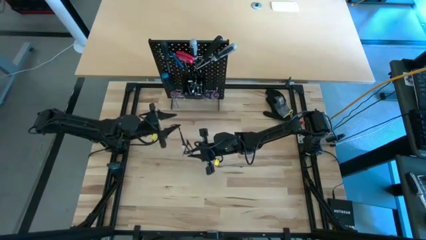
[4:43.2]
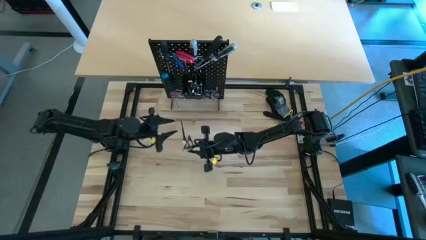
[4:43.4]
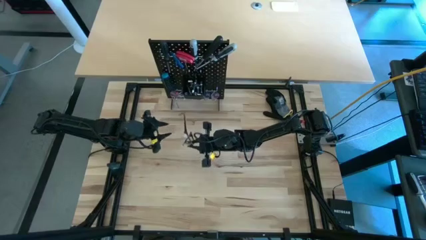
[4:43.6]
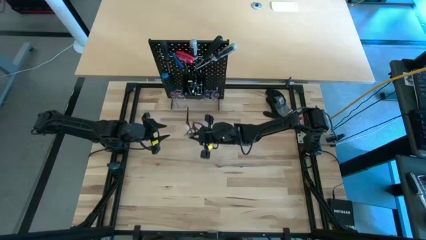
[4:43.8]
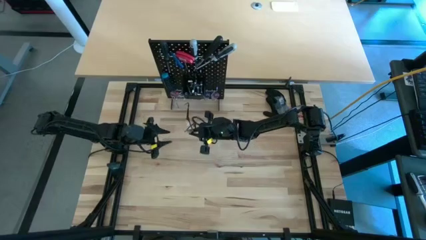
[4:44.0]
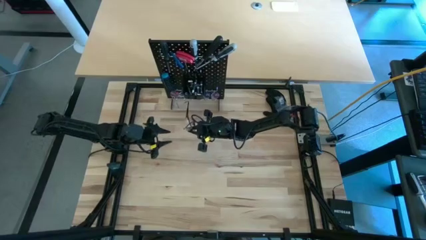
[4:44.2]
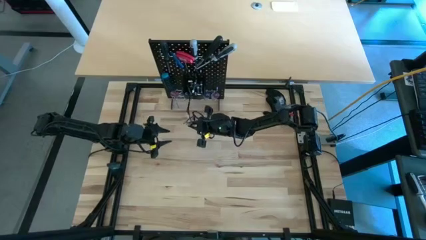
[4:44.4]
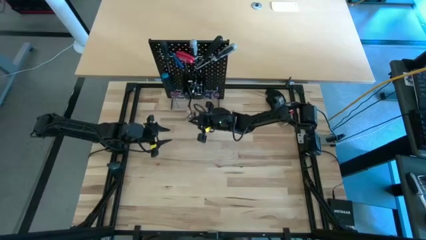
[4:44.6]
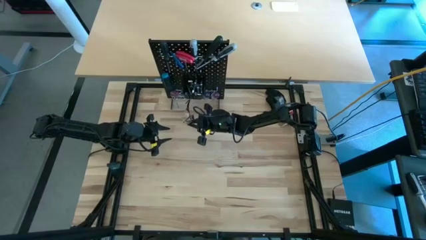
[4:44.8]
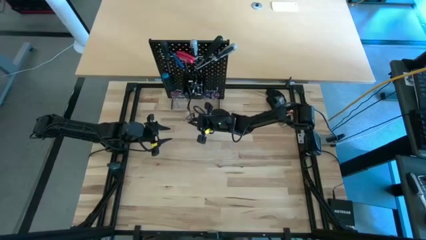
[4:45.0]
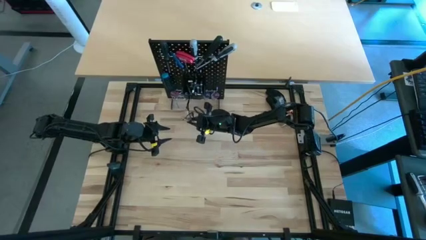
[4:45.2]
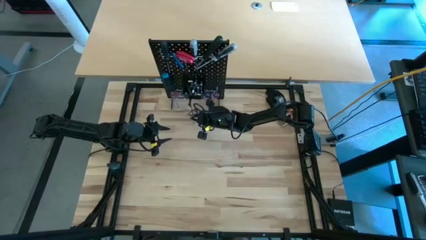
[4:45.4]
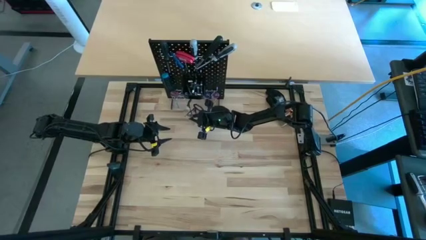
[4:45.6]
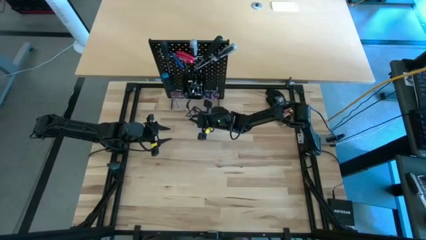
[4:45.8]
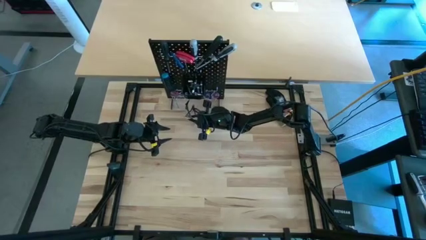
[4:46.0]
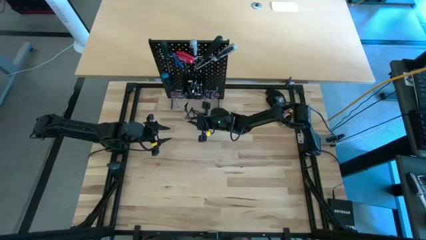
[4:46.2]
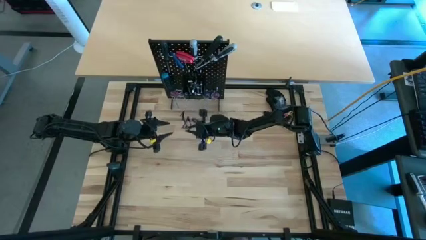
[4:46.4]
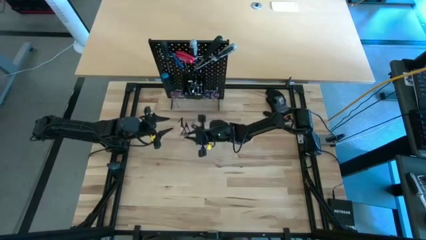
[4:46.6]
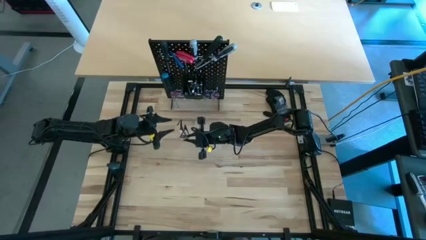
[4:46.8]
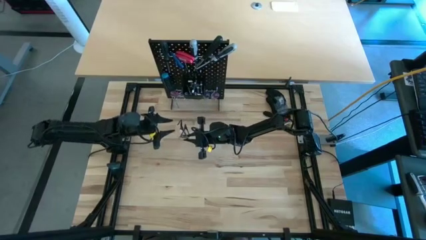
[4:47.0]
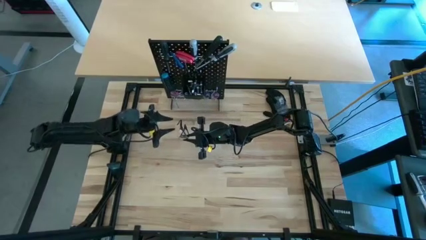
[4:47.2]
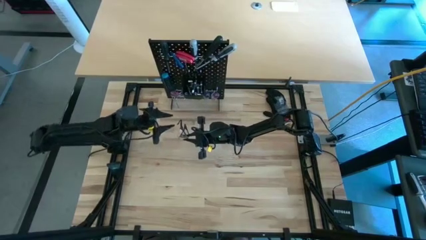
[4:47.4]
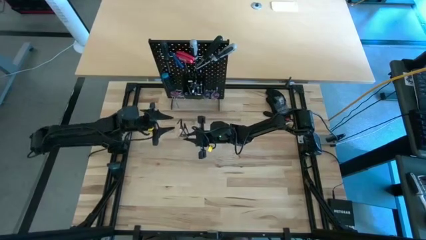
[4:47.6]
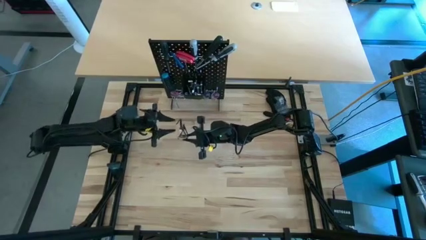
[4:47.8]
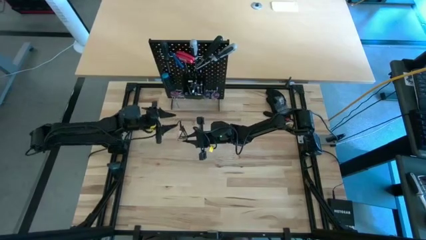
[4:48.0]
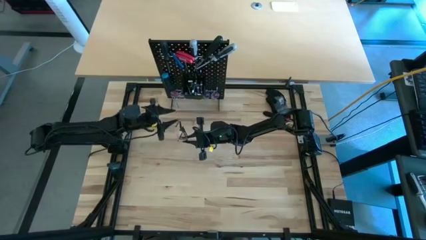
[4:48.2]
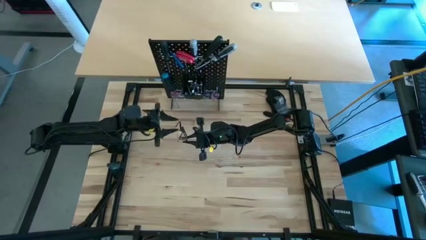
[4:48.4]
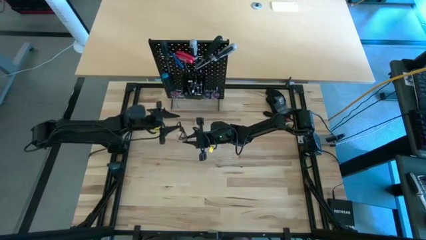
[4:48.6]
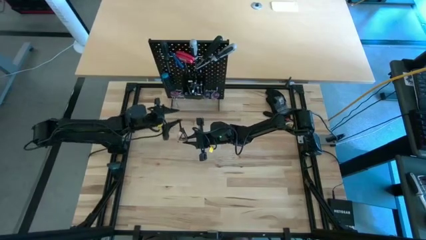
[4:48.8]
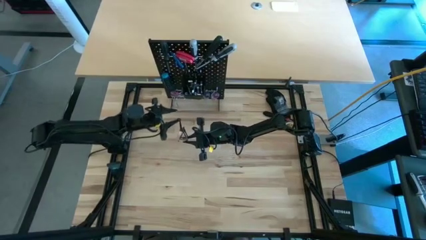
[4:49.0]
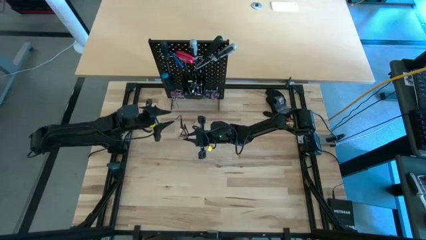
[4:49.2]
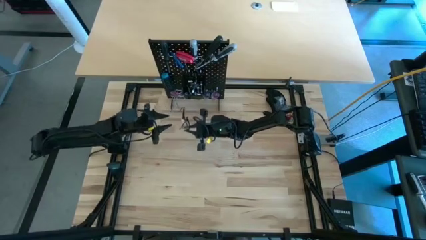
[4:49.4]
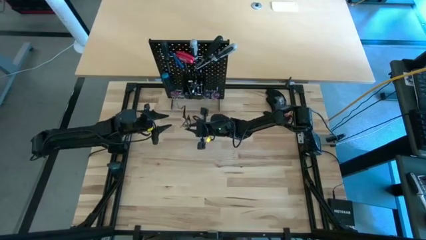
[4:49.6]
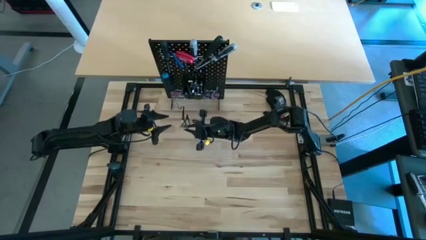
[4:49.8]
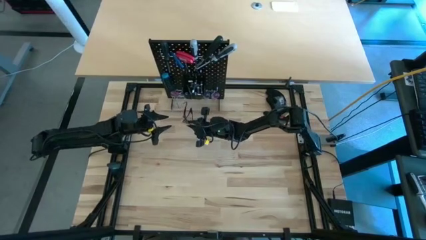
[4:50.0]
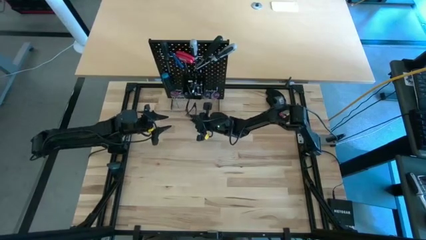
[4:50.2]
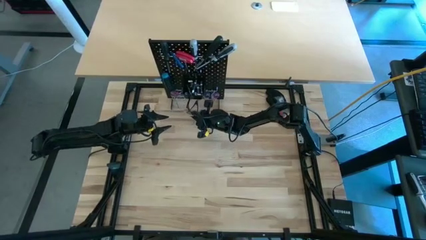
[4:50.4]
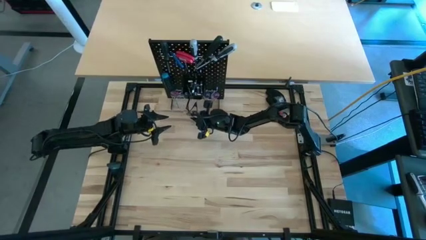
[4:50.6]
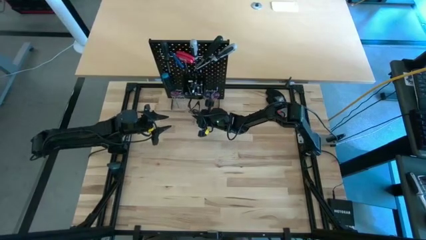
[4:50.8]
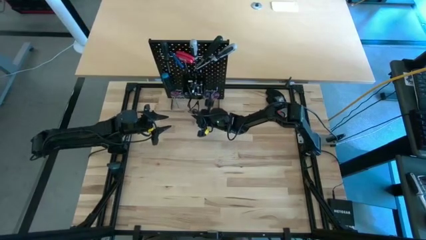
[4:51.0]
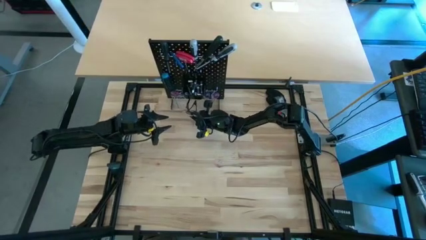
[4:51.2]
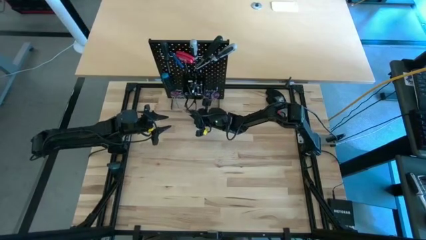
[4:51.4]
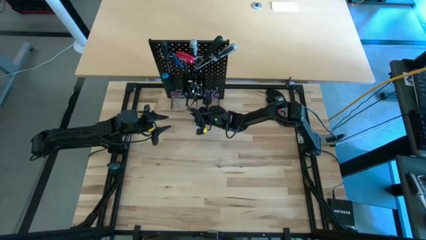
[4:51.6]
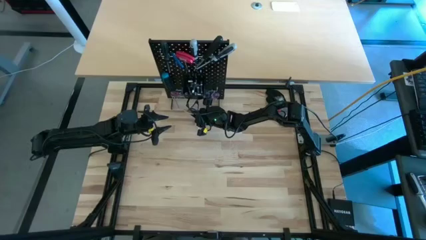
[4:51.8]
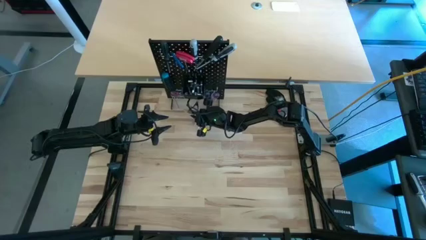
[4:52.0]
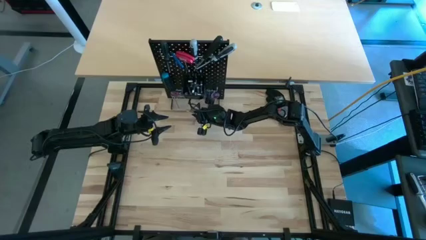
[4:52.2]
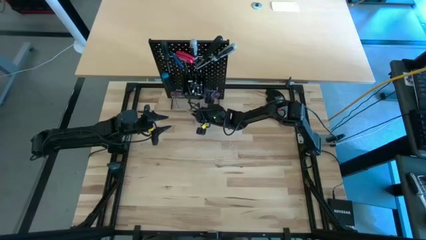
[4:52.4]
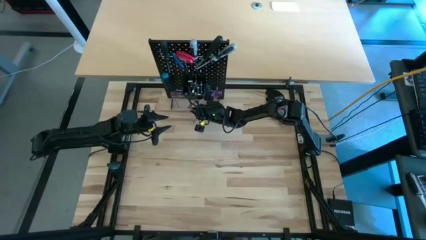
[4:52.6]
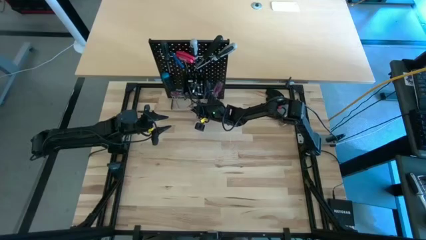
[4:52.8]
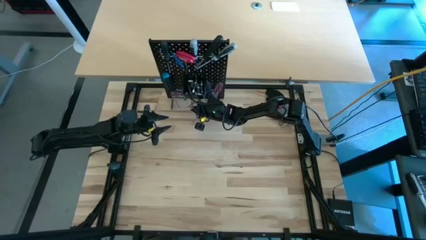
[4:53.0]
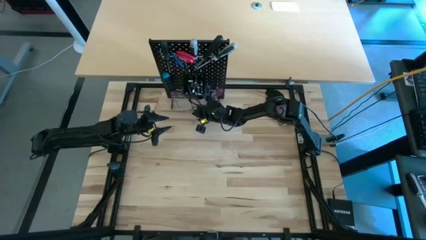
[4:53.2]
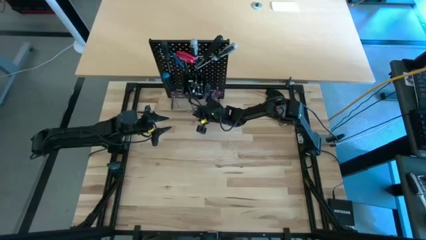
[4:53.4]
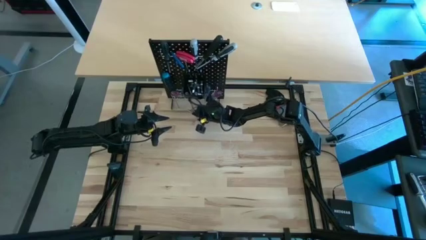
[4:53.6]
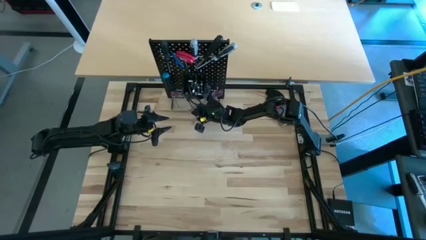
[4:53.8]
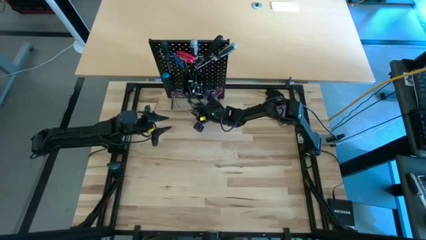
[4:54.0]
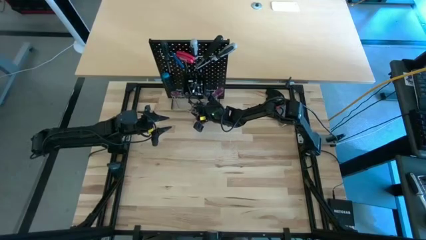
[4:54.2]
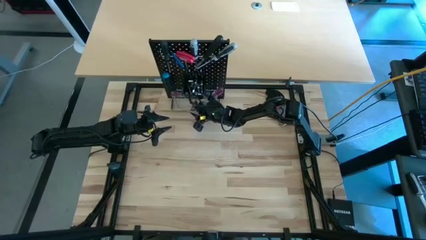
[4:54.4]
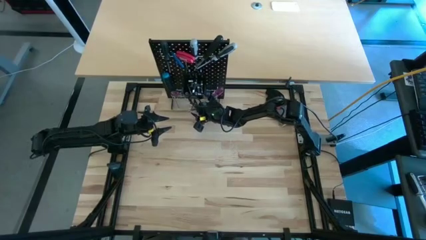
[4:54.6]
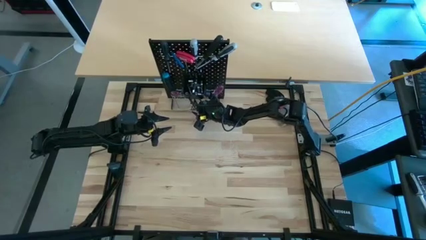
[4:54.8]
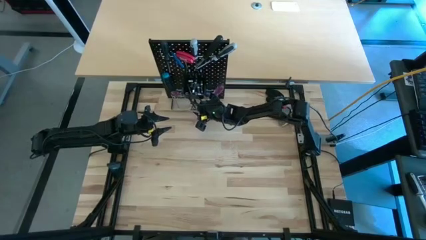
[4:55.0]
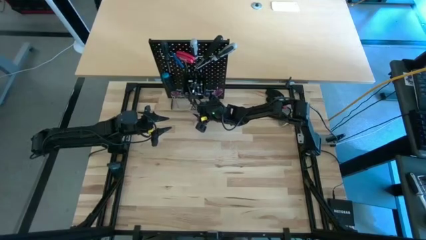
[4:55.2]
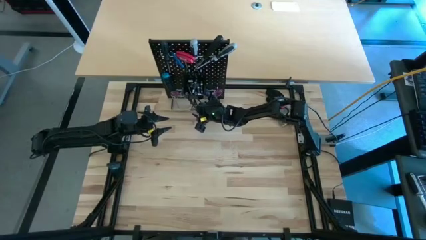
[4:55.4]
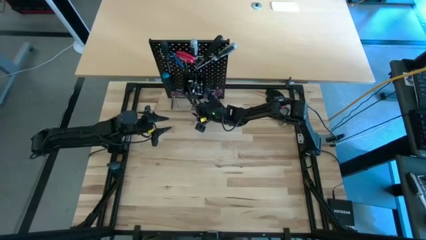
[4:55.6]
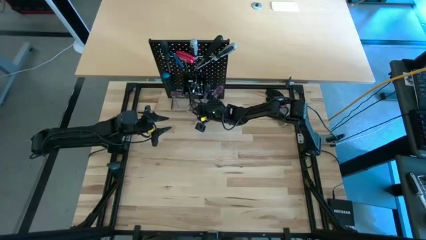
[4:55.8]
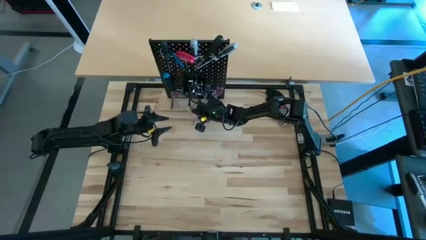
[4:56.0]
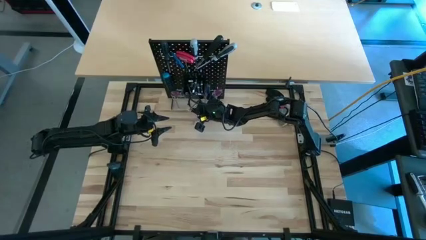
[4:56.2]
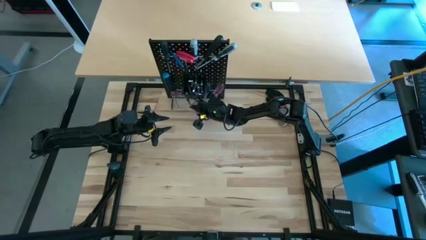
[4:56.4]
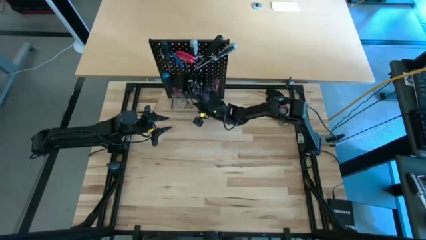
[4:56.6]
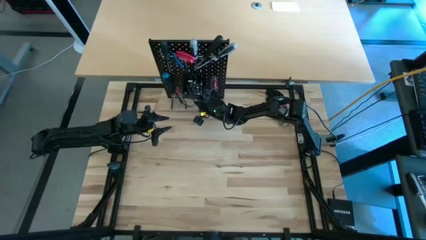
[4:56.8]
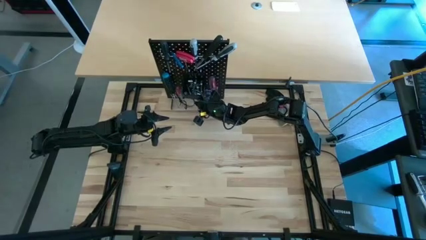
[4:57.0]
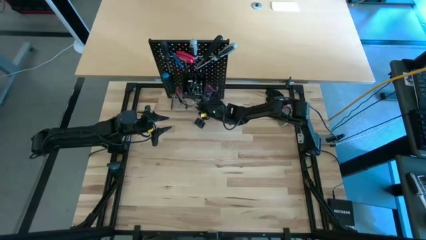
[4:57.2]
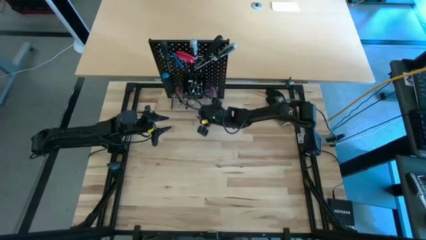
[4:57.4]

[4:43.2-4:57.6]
Task: Hang tools onto peg board
Hang the black protective eyewear on the peg board

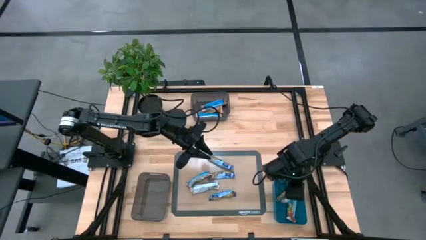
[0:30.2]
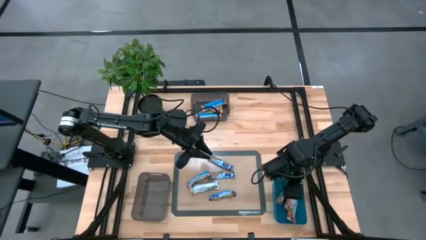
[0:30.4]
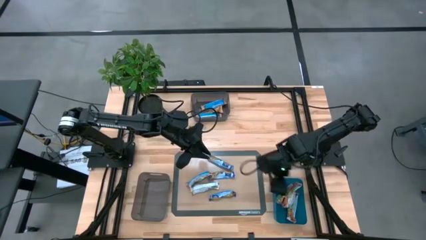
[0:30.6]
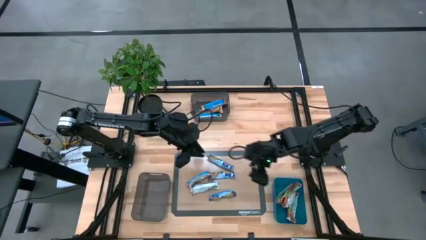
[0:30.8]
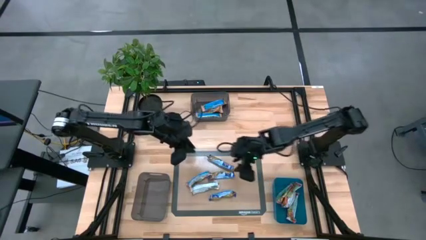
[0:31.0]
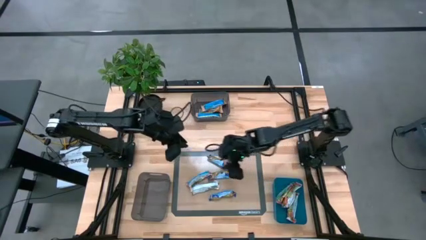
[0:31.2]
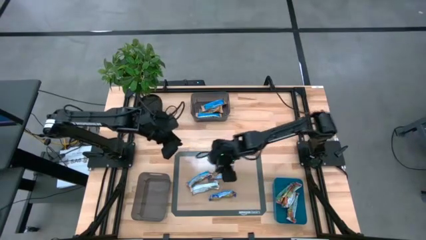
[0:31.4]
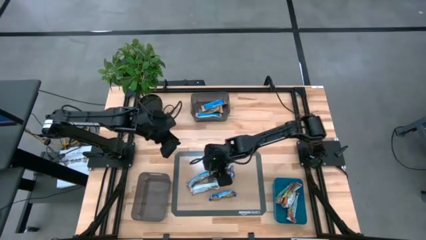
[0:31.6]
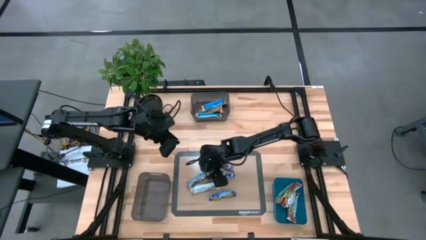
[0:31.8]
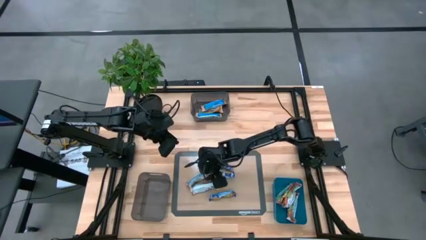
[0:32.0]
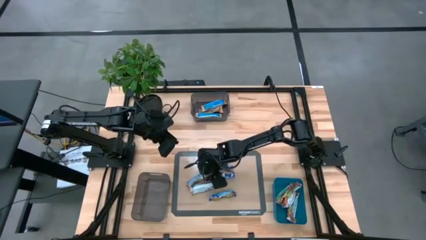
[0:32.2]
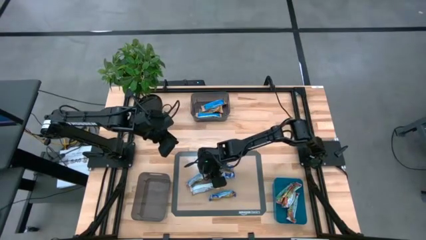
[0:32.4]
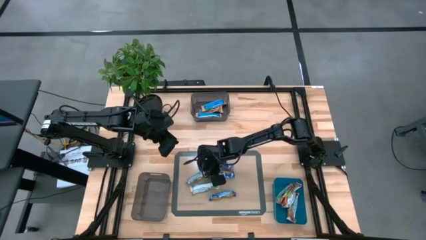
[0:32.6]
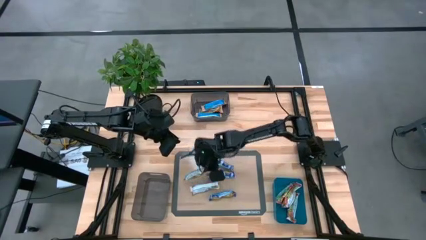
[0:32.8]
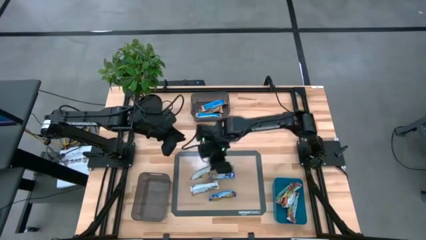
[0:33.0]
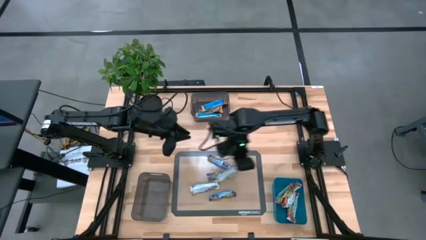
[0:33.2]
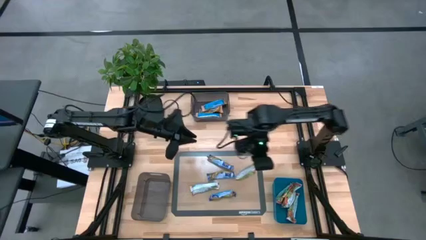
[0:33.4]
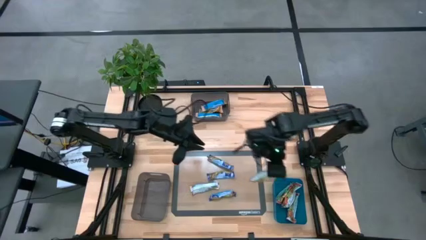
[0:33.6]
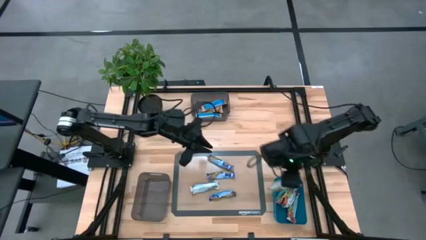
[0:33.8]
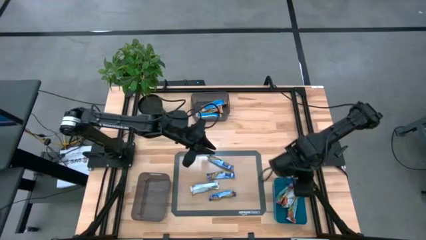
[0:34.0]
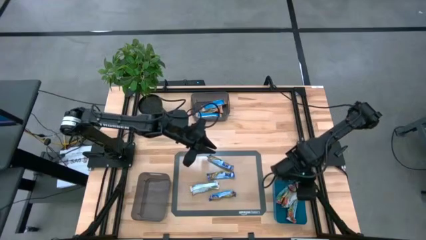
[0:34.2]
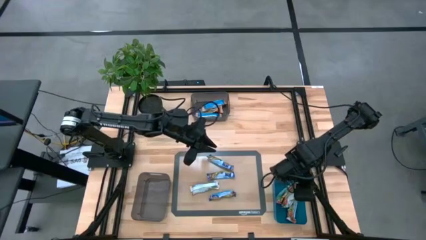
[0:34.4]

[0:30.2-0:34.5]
Task: Pick and place Granola Bars by type
Put the red granola bar into the blue bin
